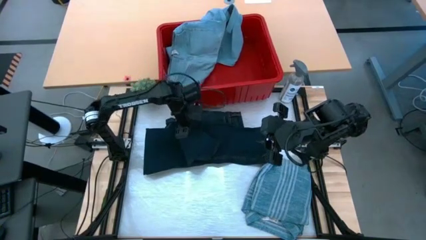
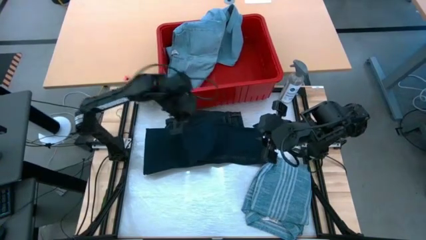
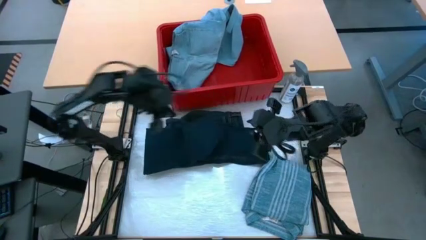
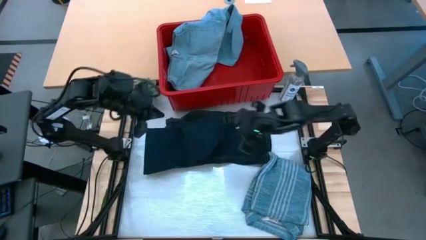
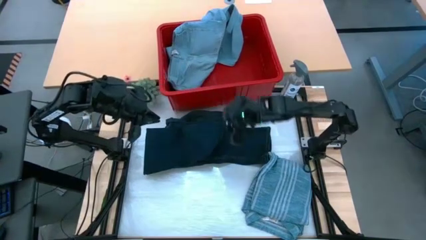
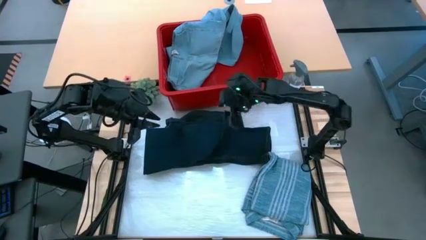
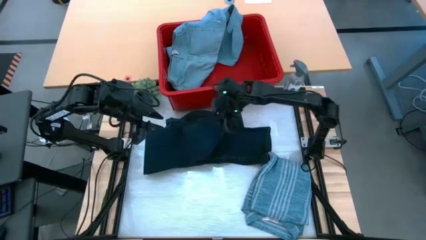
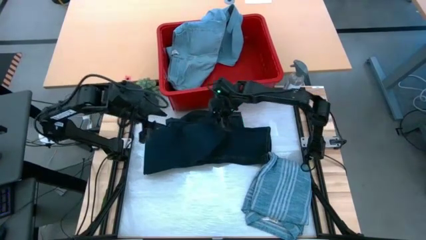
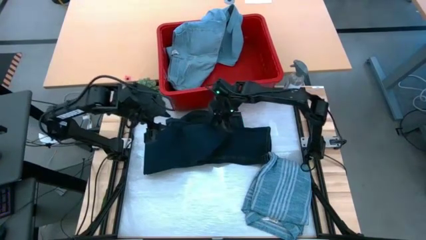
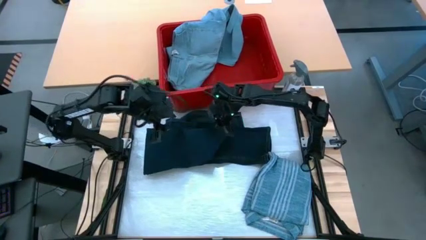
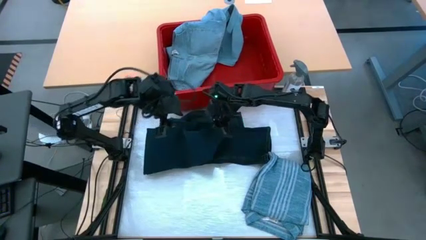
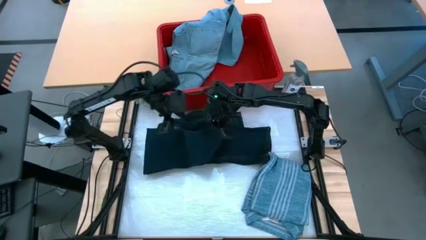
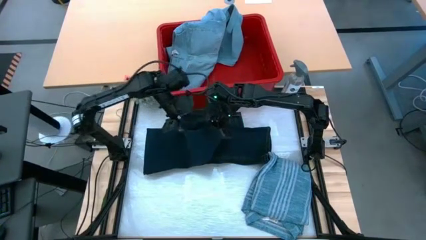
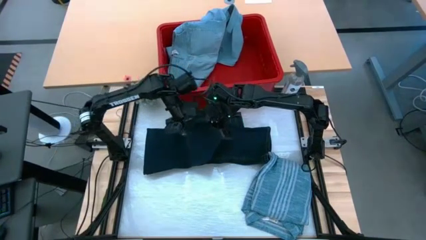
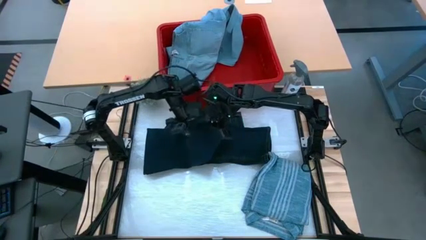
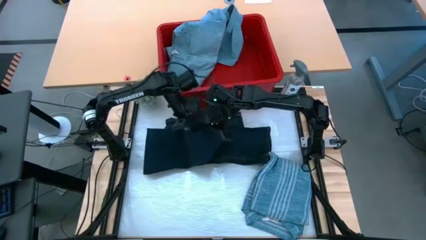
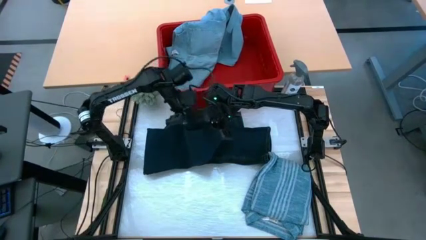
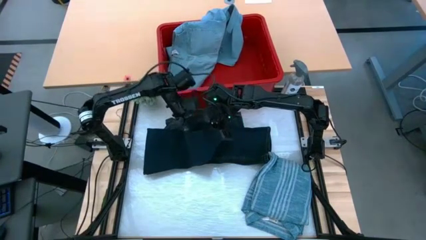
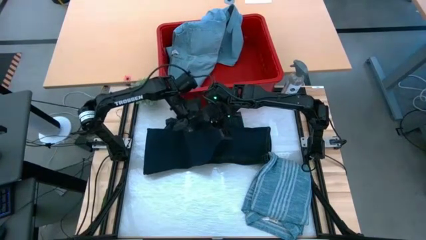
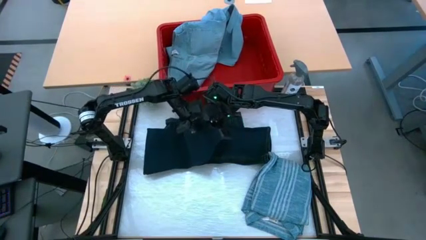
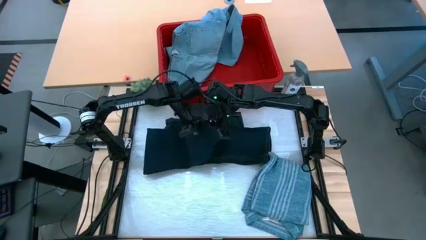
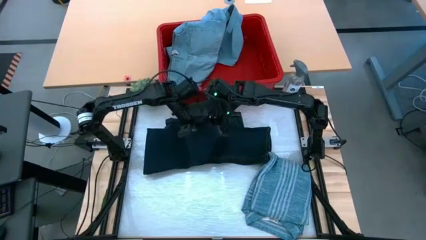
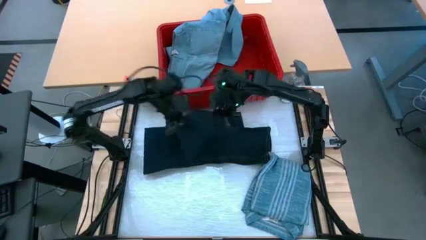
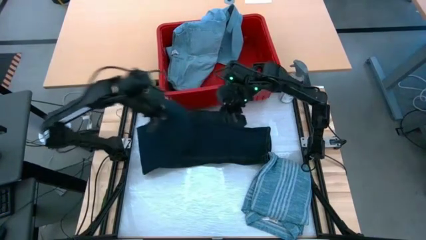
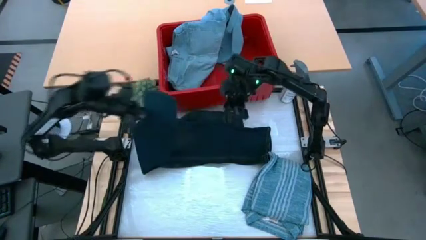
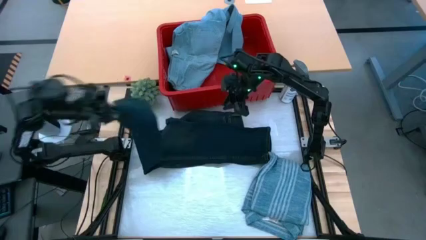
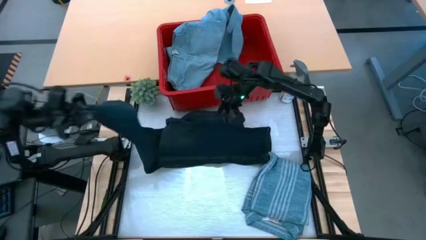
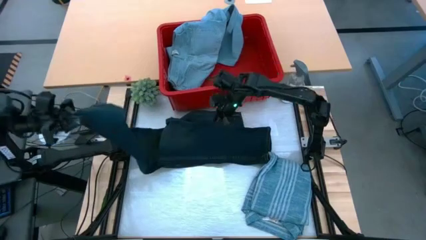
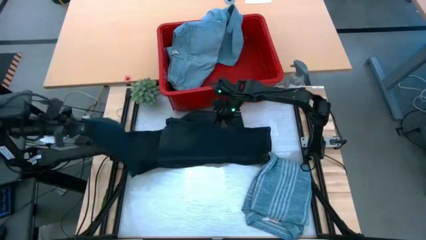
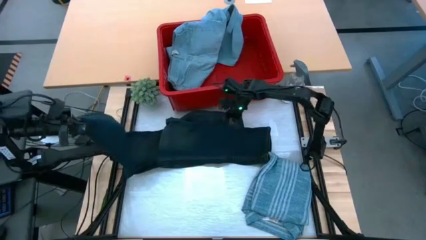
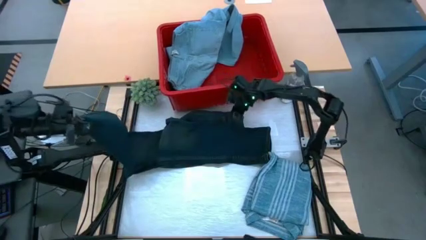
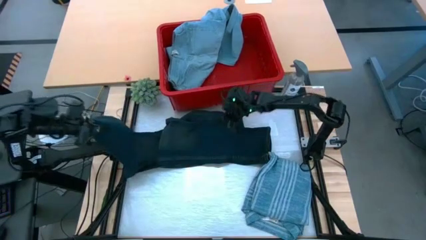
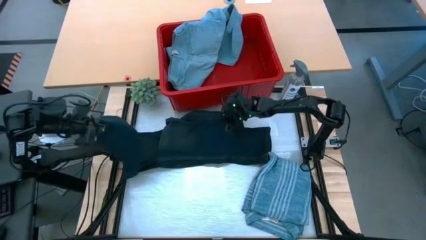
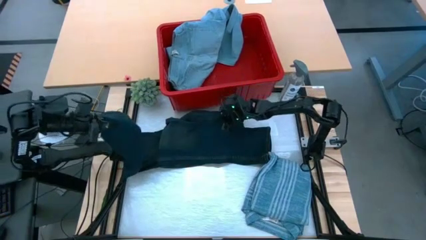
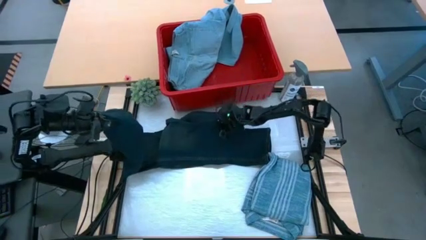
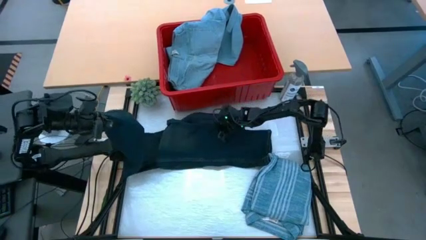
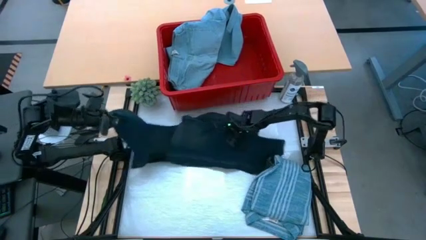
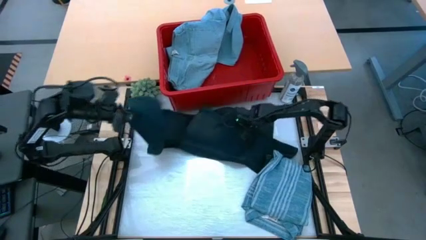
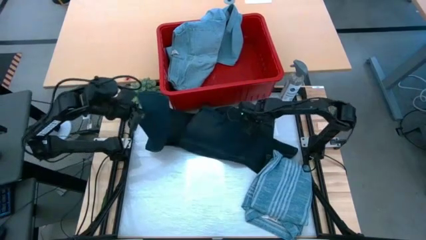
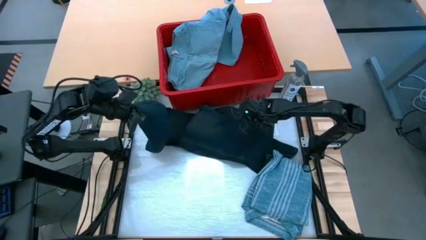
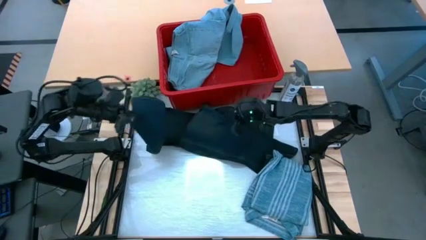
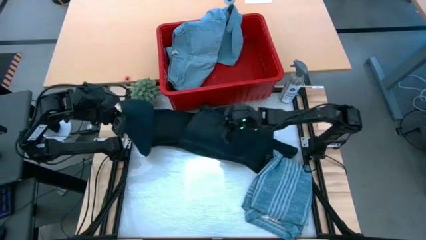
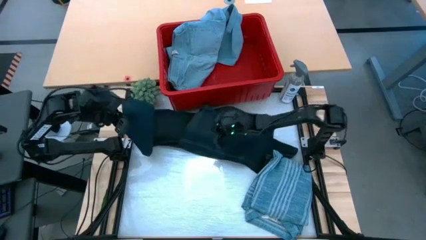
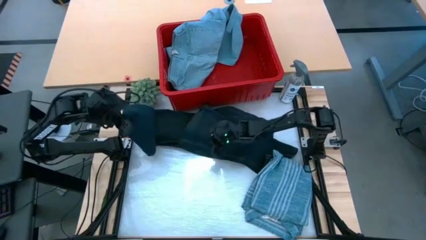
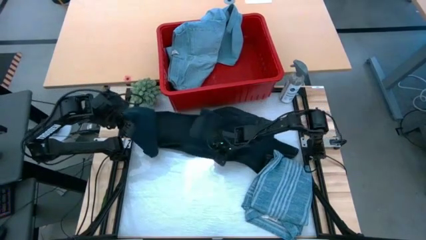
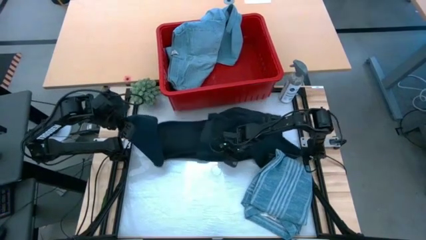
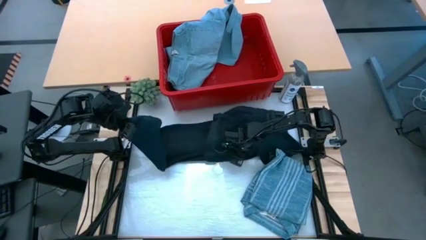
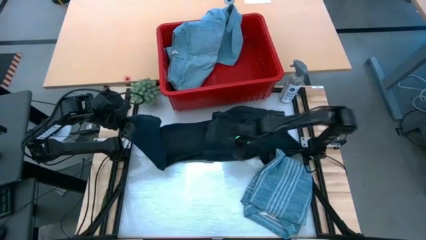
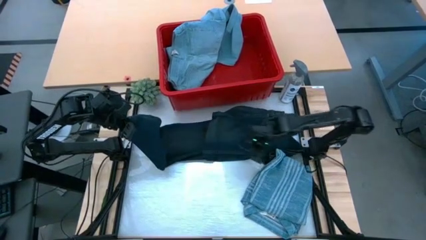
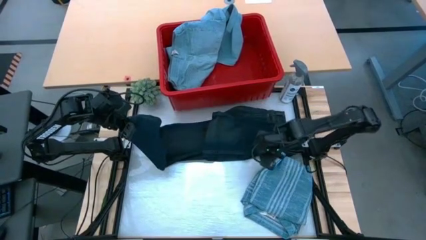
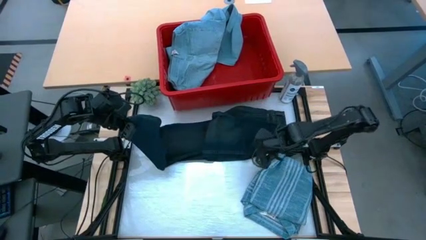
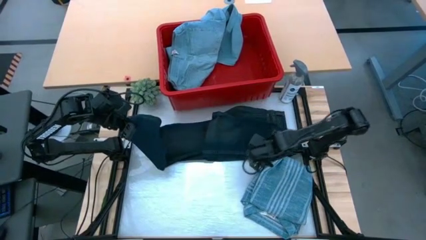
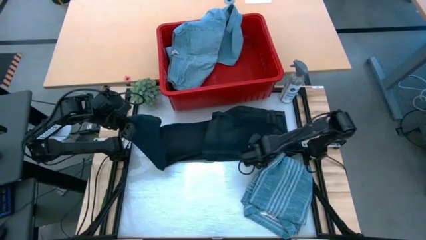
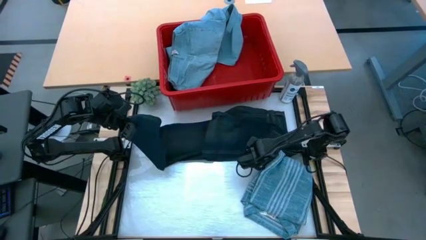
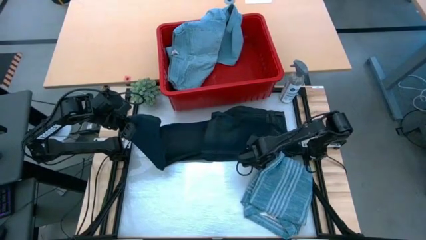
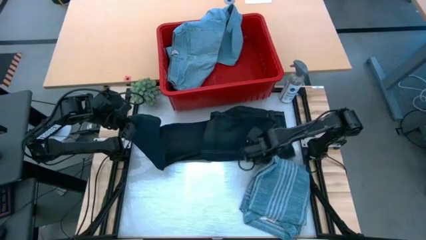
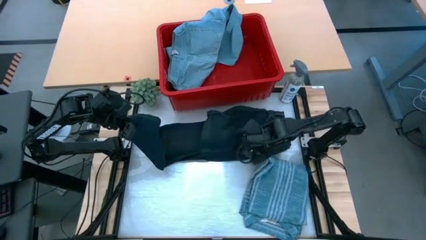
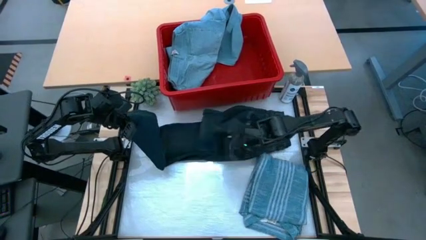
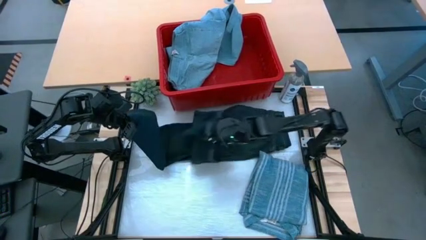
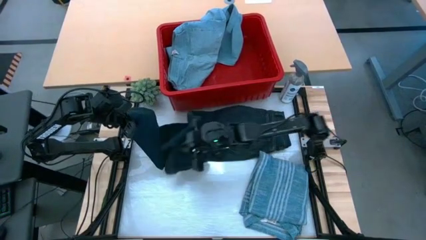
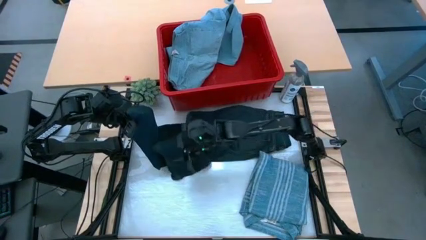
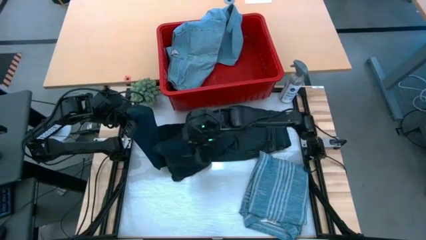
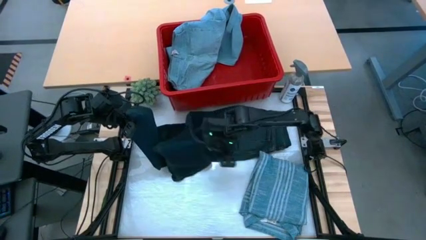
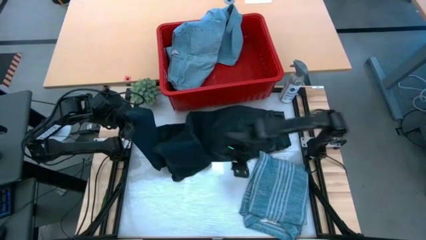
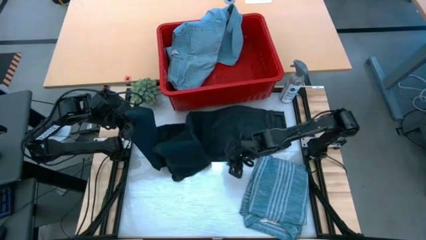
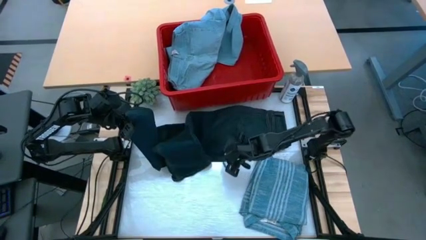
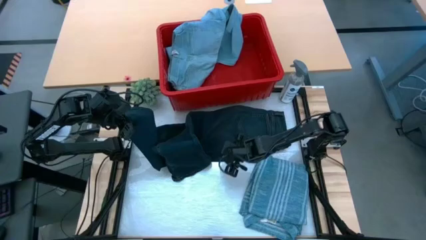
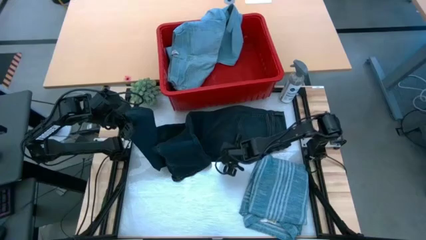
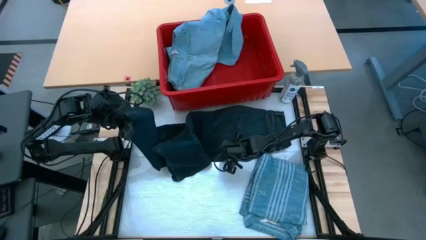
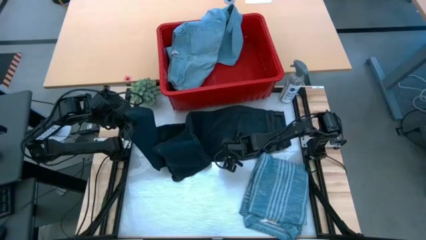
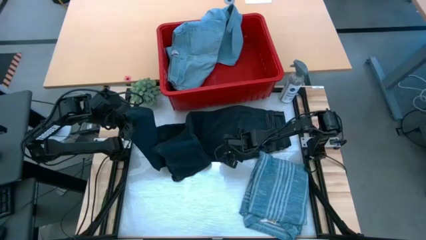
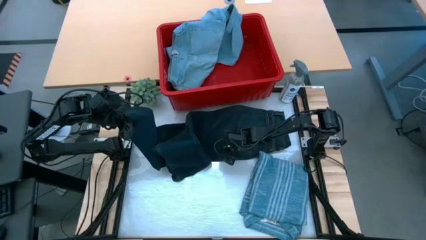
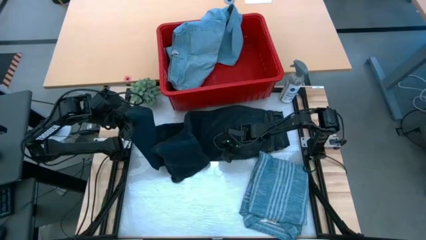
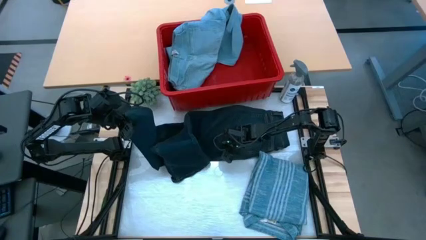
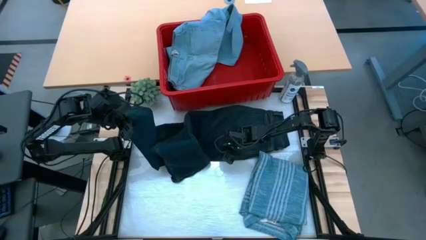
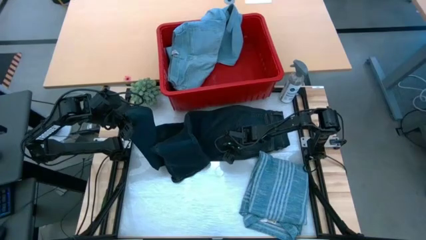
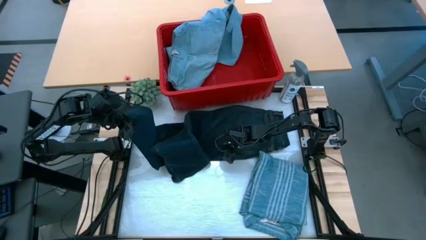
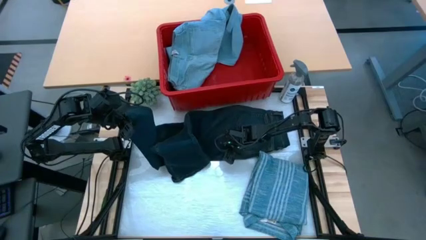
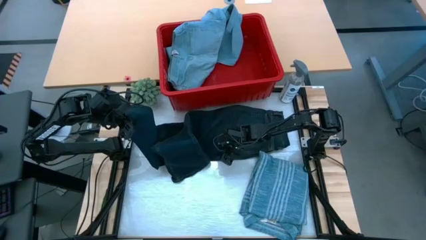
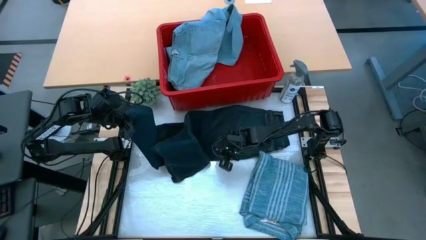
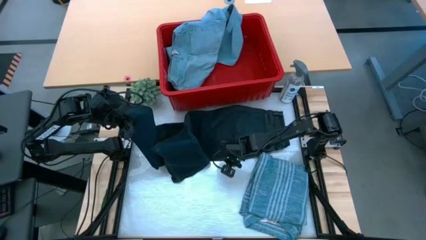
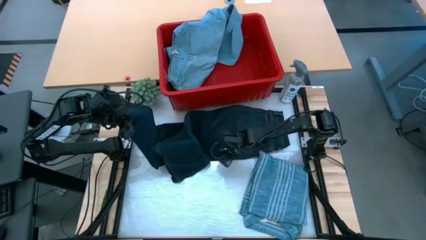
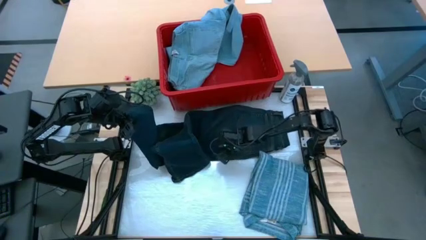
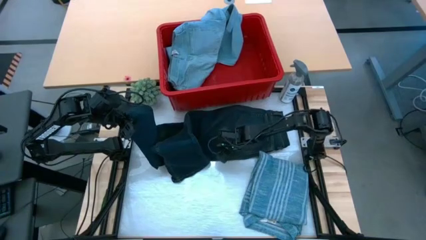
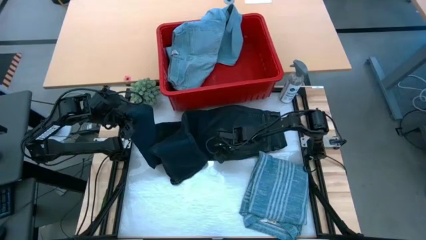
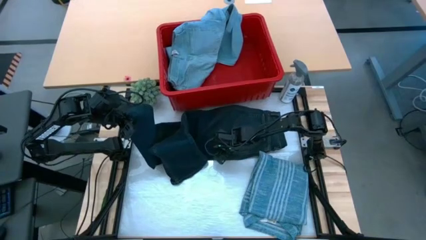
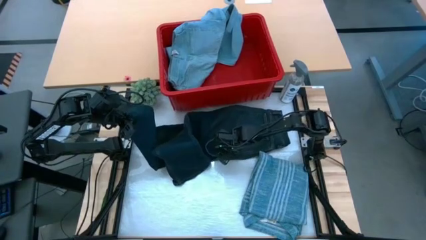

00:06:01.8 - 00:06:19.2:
Task: Fold Laundry from Bin
Fold the blue denim pants
